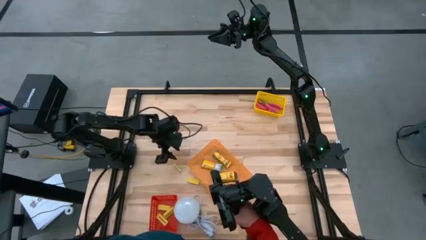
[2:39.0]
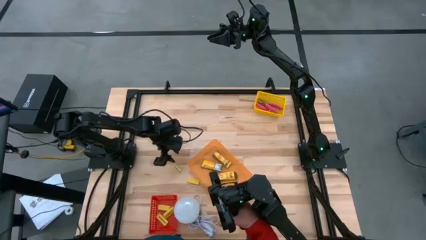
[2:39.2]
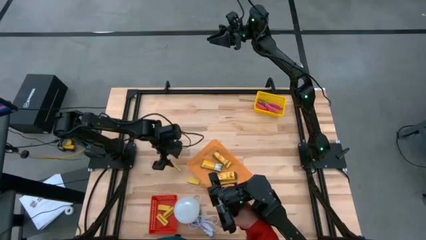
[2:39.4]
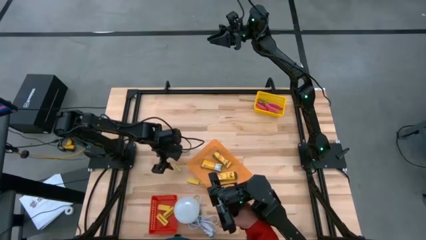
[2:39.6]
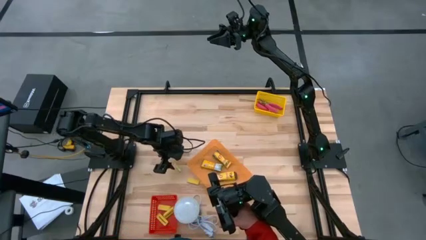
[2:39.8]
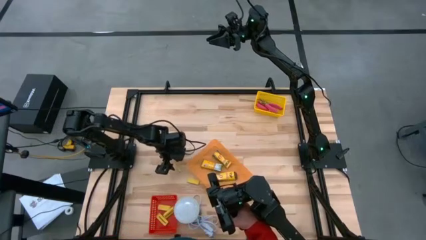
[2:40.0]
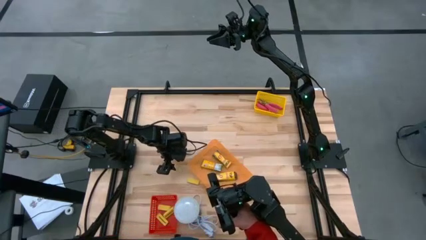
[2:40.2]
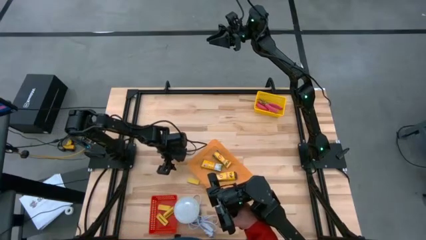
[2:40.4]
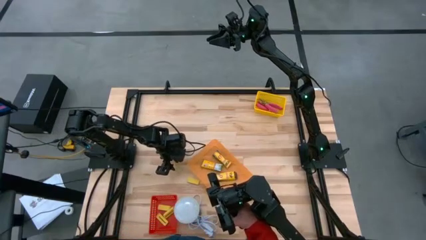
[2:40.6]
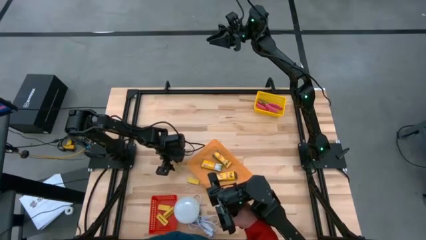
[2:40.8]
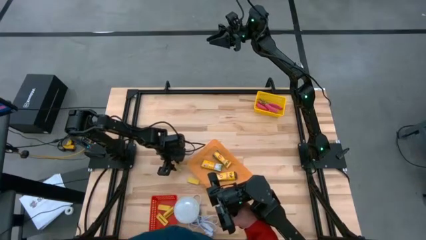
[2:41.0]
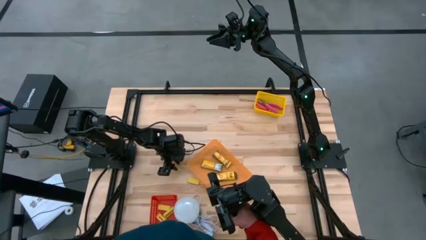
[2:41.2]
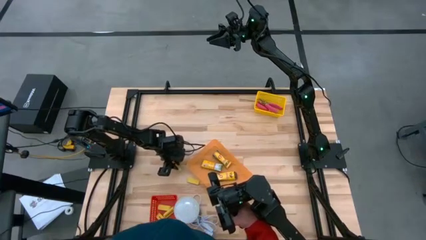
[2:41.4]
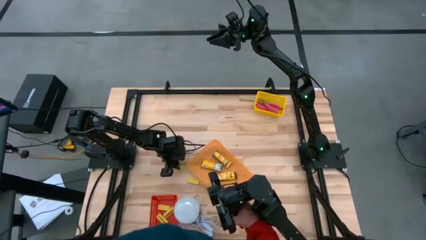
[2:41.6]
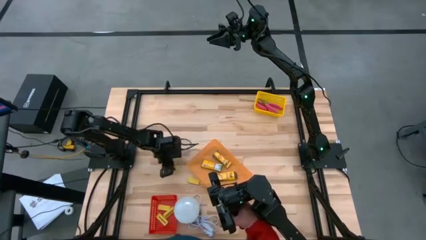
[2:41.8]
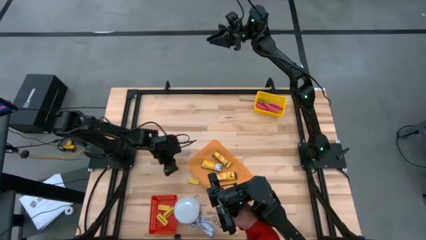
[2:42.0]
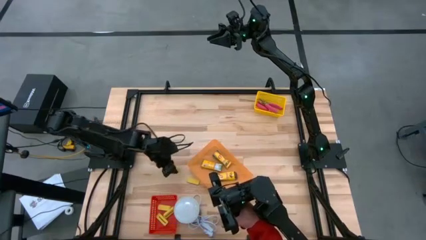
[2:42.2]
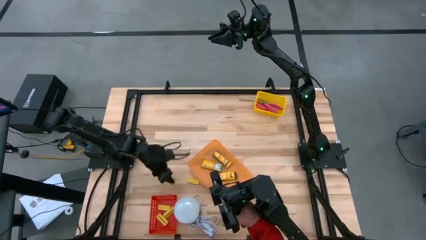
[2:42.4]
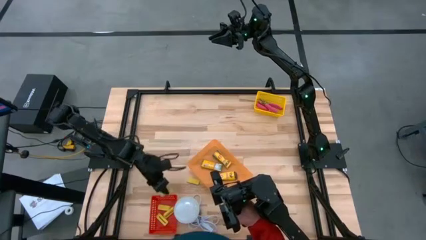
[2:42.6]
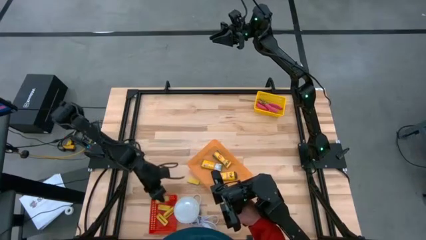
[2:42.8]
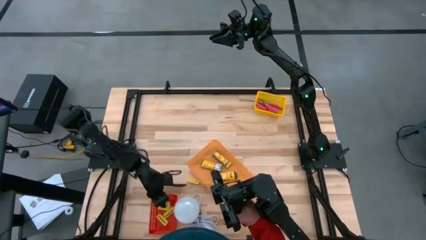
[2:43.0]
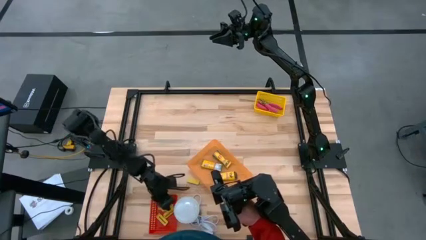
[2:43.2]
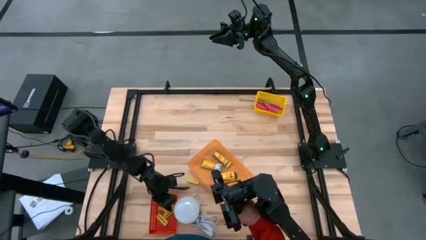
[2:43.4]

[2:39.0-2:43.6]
Task: Pick & Place School Supplies
Put the green eraser into the red bin

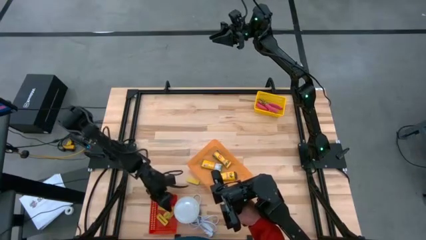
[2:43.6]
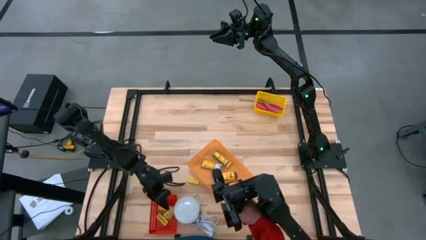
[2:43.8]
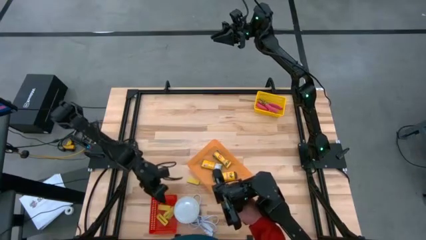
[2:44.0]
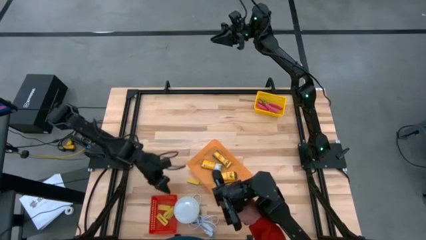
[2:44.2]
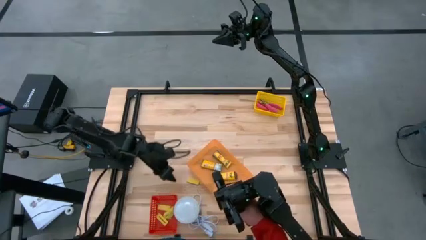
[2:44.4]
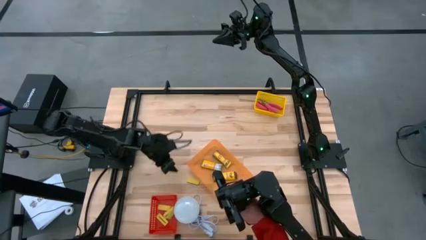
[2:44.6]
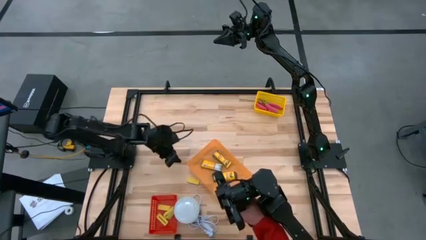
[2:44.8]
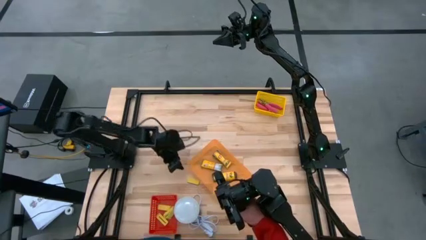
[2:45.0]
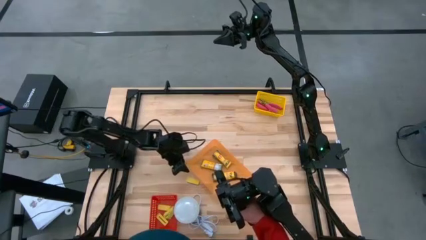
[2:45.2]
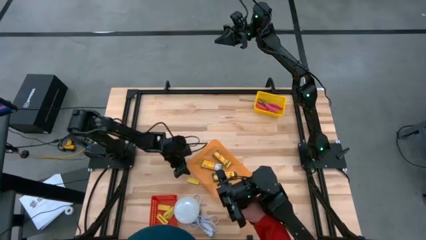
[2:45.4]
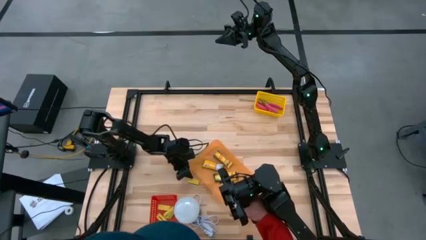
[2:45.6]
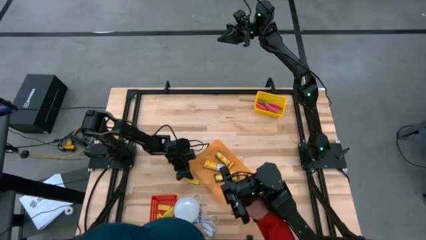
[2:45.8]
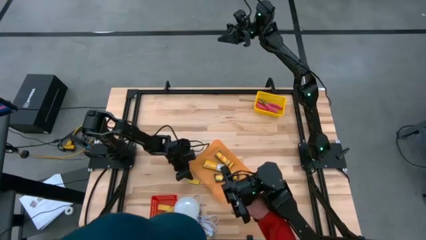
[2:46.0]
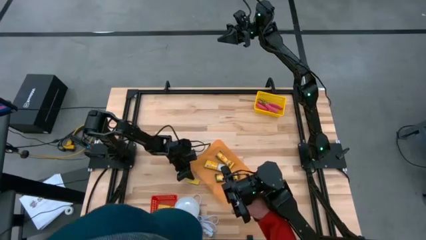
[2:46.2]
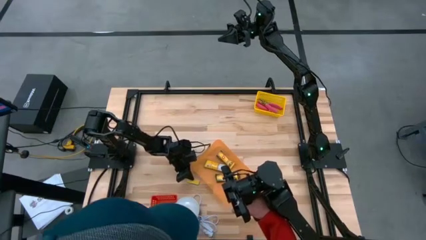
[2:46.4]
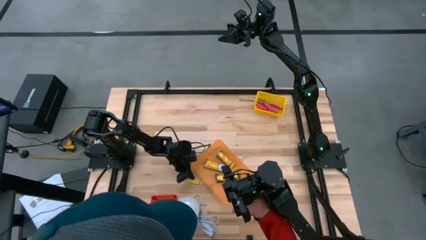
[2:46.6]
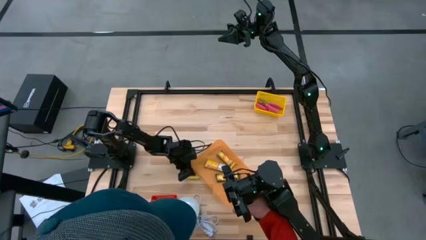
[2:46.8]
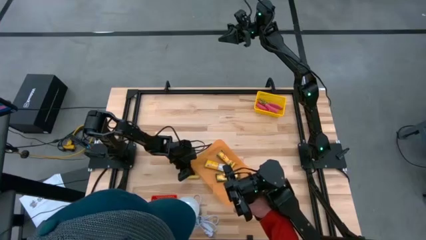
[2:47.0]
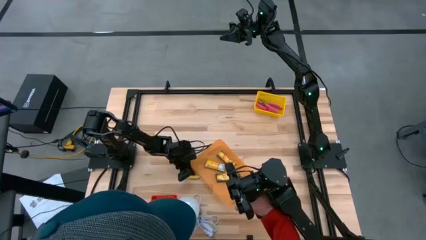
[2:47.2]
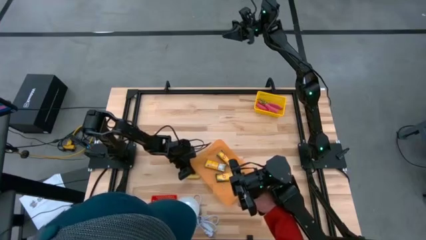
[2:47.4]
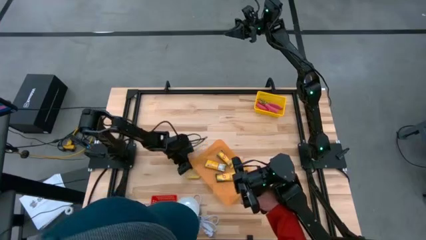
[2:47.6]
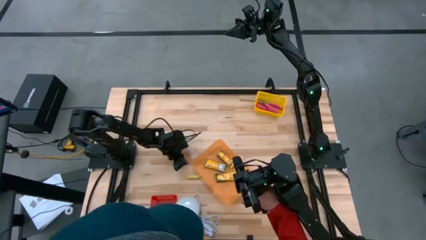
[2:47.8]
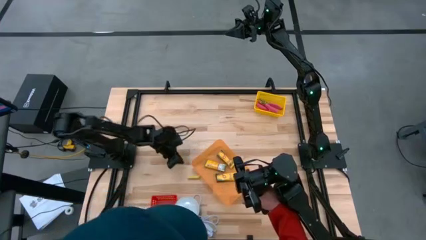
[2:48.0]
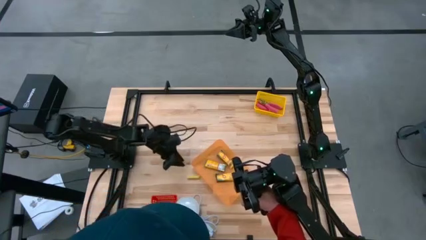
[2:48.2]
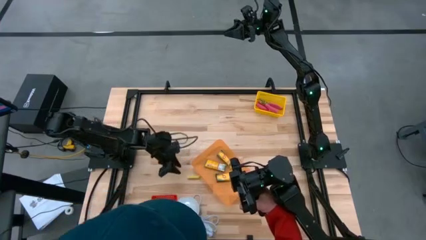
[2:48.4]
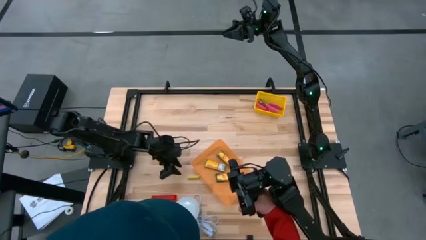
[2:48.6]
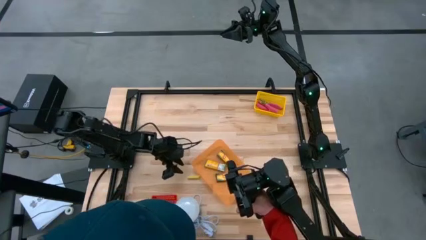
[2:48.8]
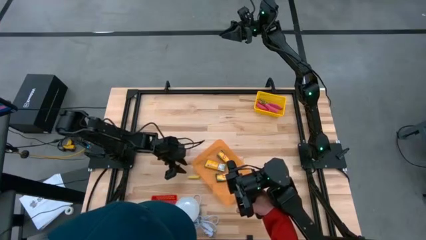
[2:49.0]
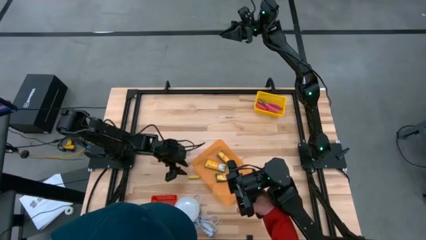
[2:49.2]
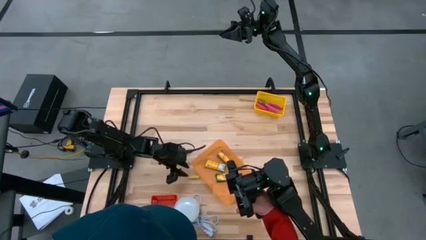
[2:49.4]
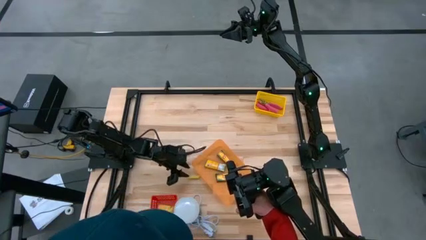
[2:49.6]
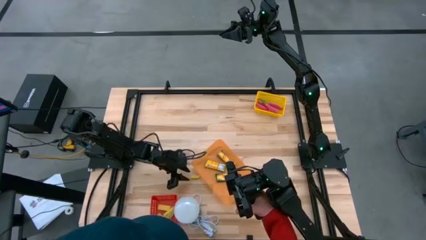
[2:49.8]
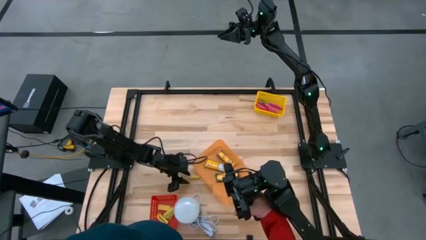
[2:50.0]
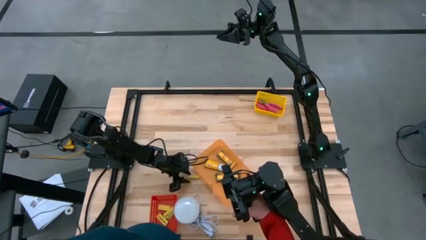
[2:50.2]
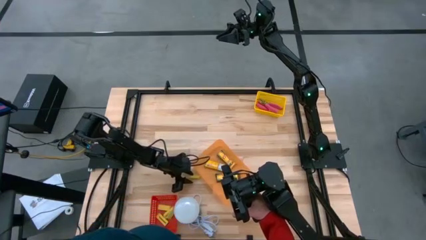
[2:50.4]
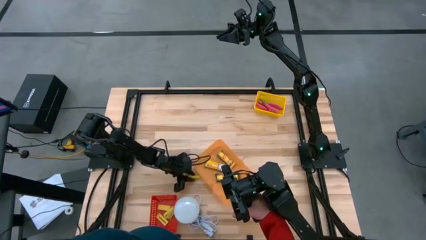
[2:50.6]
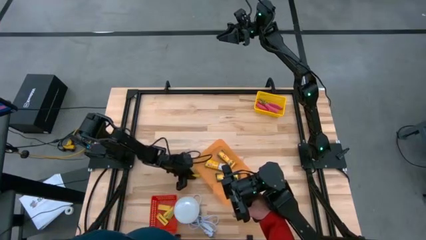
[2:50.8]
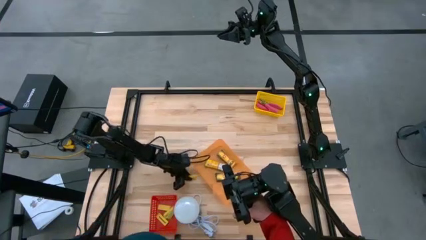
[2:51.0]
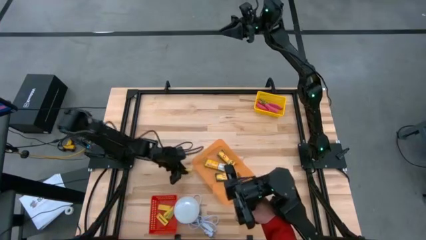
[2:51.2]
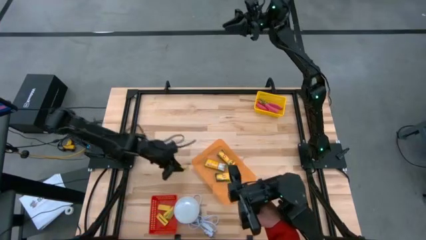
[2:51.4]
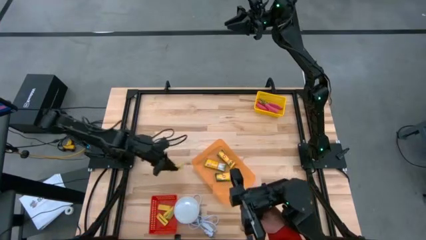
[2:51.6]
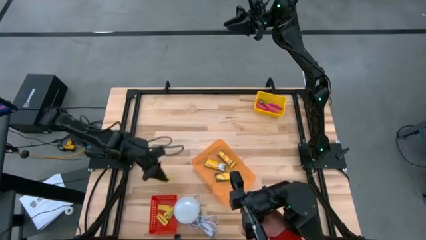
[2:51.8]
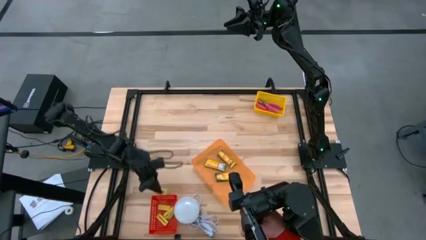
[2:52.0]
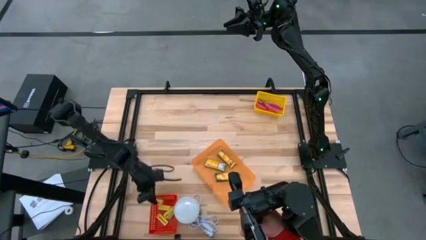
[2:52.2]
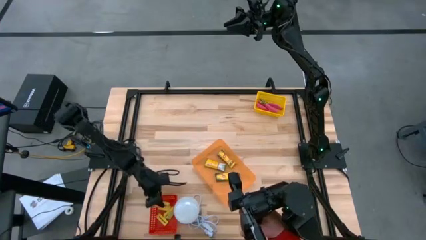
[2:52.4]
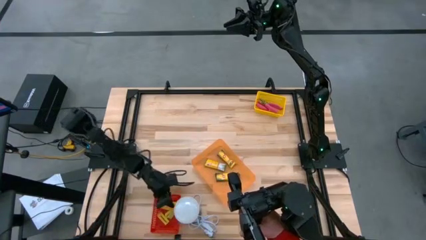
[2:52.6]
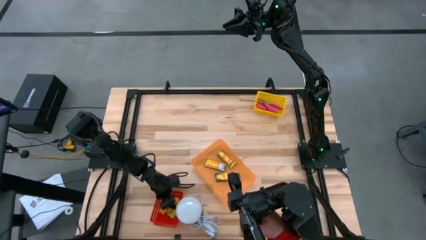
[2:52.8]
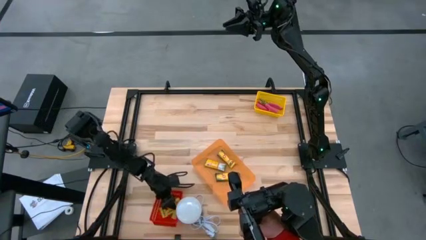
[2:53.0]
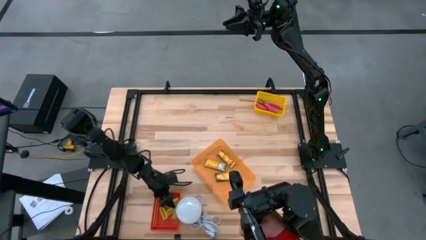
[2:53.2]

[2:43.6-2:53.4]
Put the yellow eraser into the red bin
